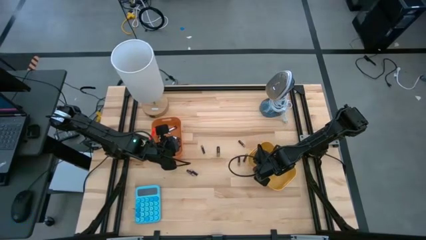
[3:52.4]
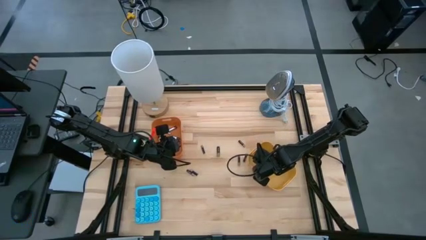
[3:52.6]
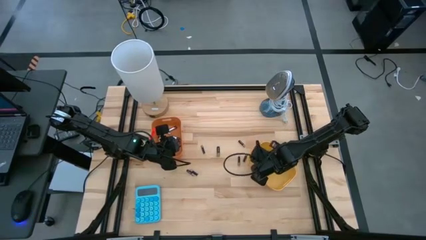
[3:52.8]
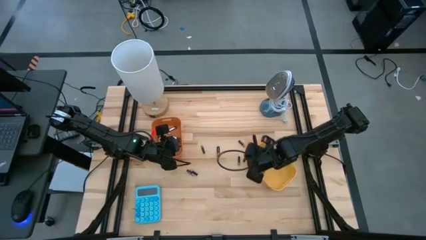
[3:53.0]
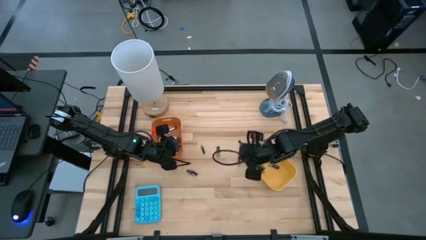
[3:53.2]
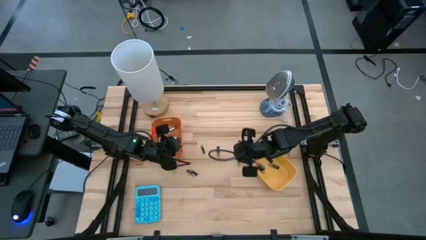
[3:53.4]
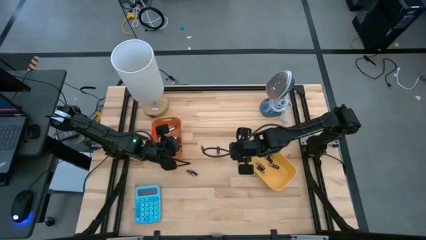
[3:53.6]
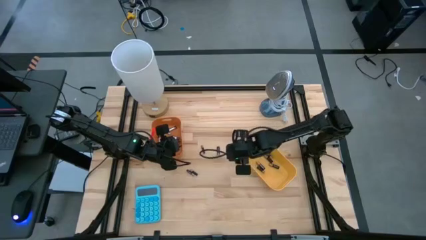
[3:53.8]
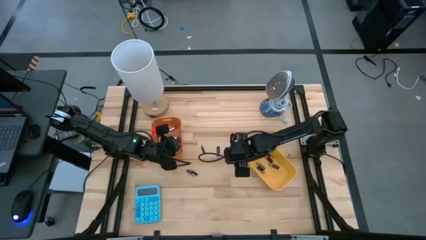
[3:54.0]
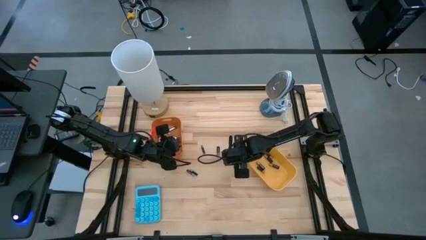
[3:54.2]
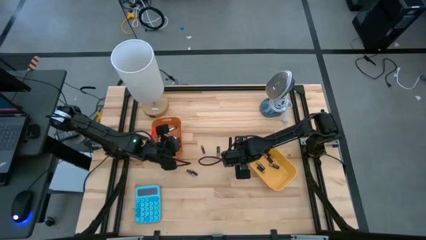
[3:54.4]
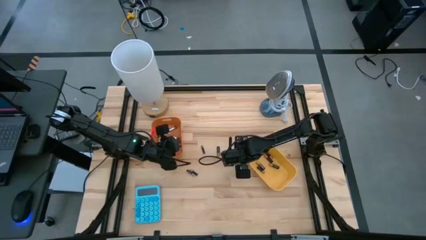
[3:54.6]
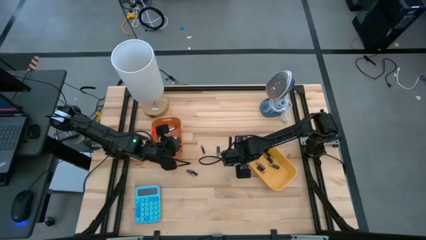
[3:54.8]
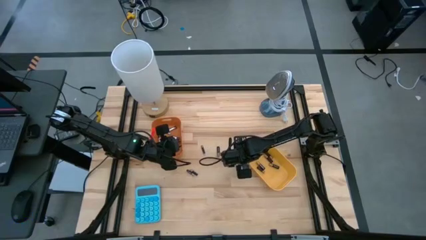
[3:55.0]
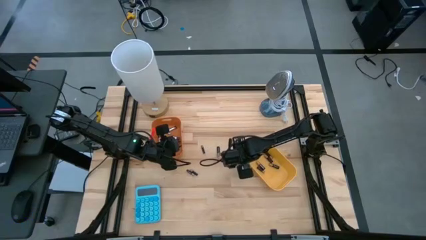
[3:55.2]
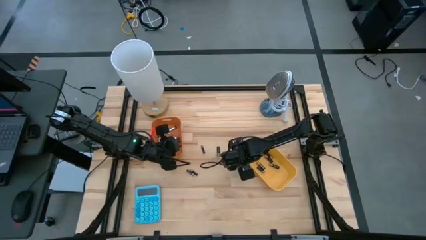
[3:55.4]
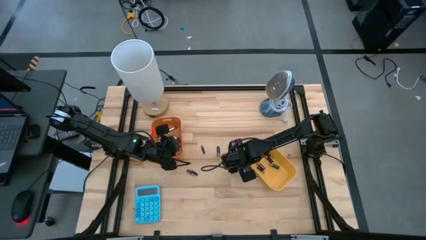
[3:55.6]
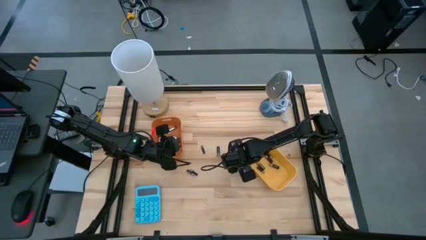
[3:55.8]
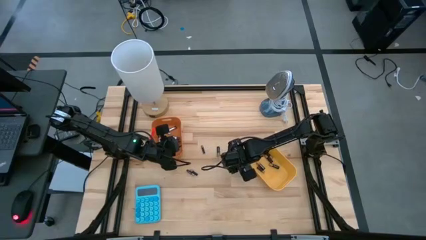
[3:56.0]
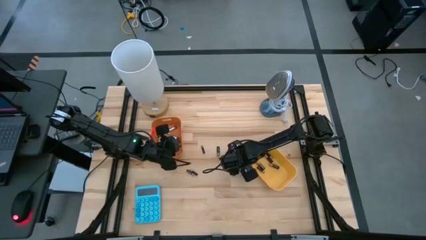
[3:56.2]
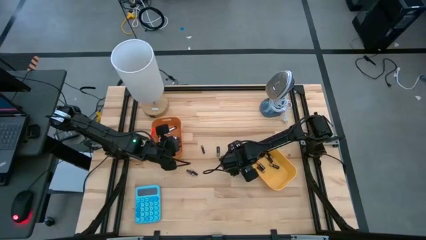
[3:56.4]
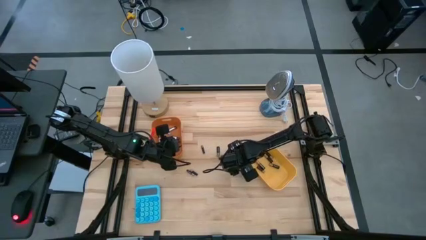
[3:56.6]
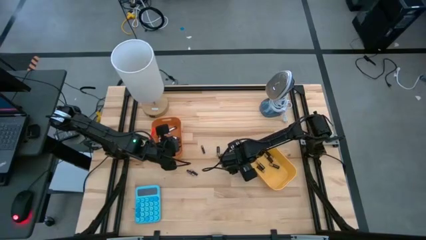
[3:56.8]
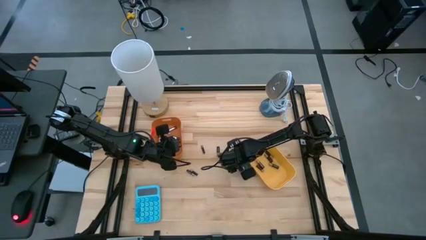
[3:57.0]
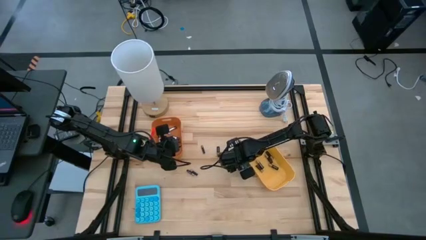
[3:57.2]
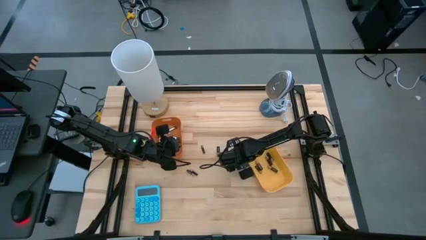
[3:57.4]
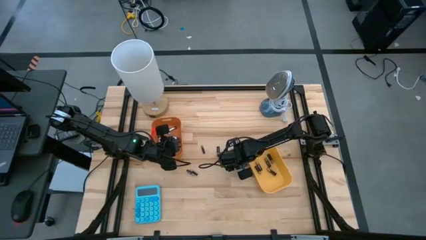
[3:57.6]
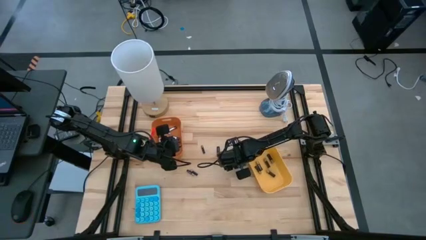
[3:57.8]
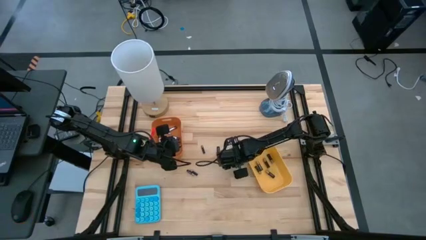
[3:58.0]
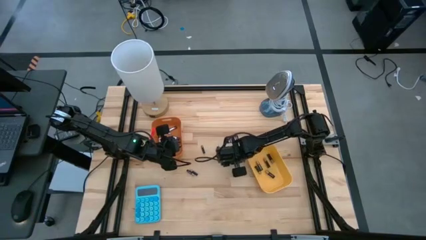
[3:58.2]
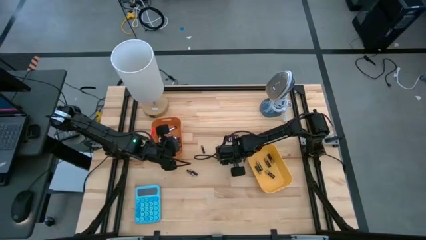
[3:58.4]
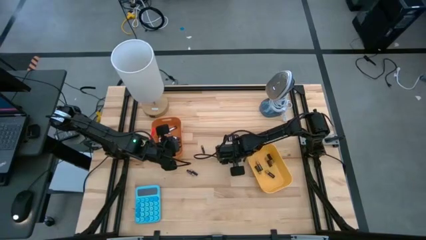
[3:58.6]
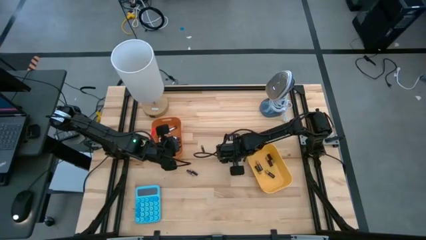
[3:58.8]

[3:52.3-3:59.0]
Task: Sort batteries
Put the gold battery into the yellow bin

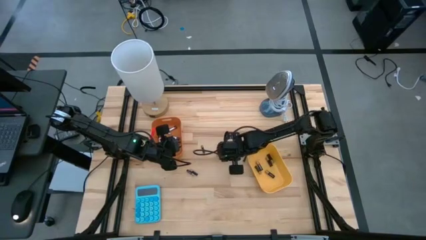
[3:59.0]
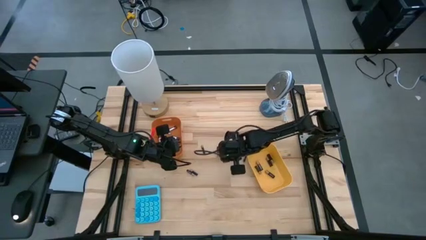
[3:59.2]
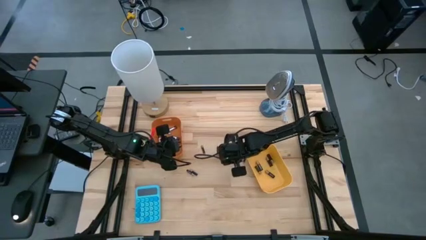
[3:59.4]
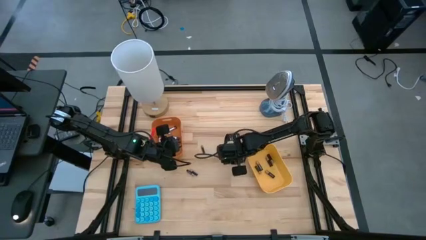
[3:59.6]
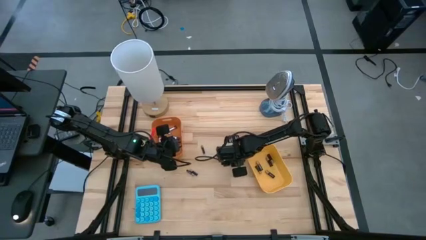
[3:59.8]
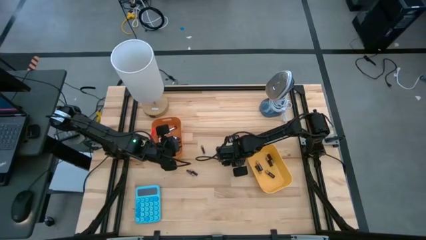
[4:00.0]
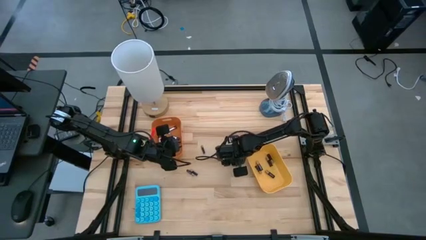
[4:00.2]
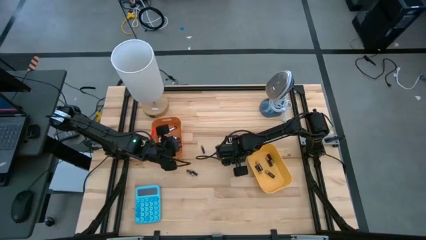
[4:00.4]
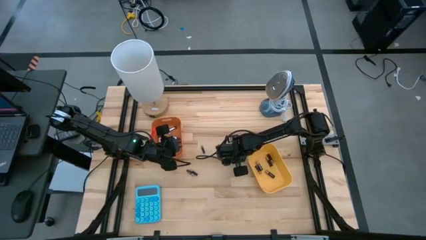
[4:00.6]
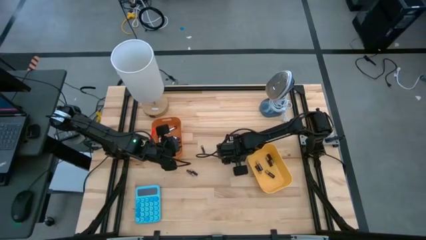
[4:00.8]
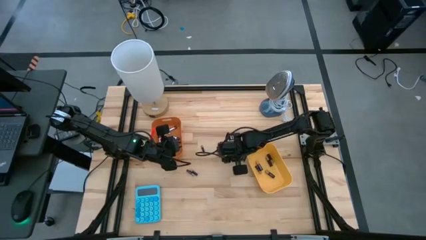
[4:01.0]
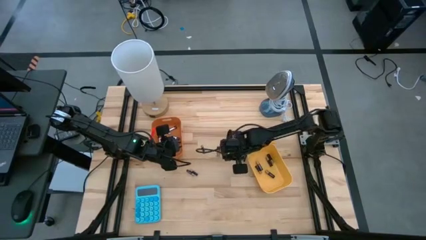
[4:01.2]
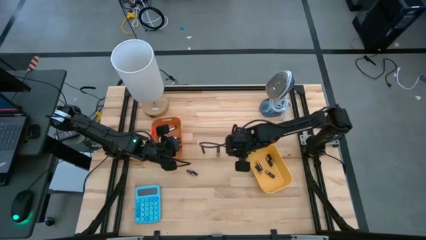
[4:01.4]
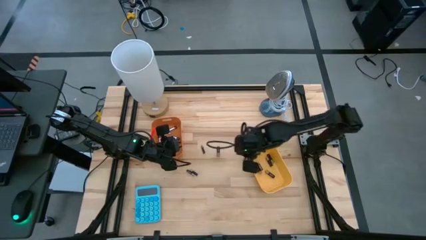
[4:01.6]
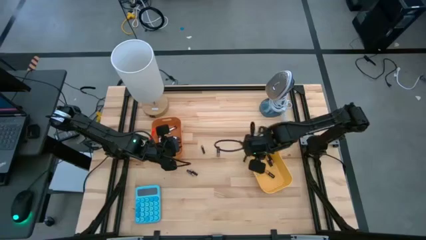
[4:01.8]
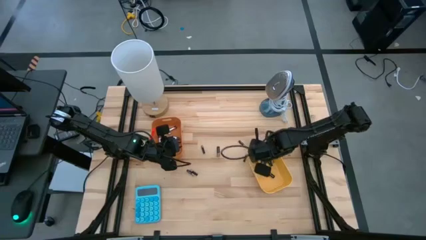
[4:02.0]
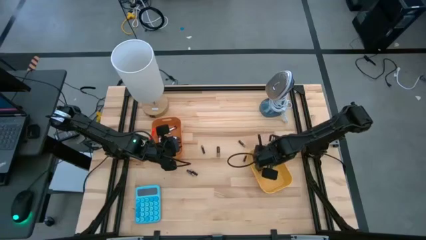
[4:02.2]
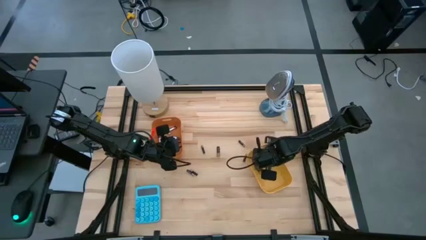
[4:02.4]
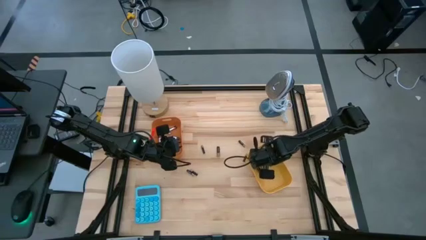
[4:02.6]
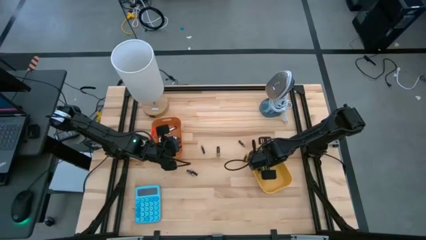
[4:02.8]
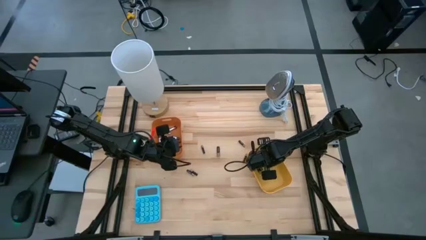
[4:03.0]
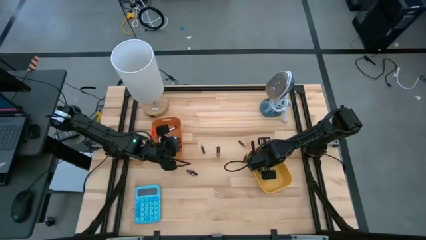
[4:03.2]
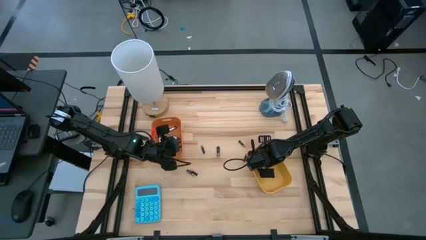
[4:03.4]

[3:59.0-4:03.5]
Put the gold battery into the yellow bin

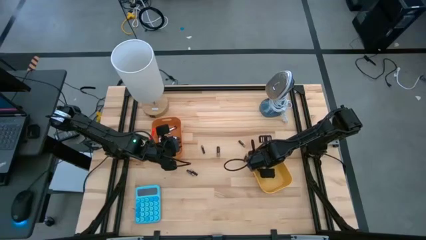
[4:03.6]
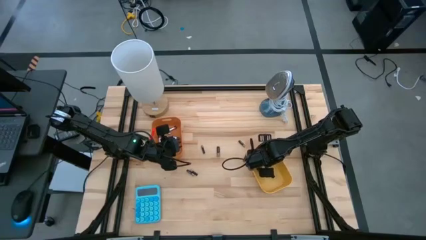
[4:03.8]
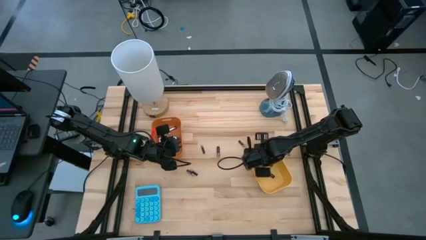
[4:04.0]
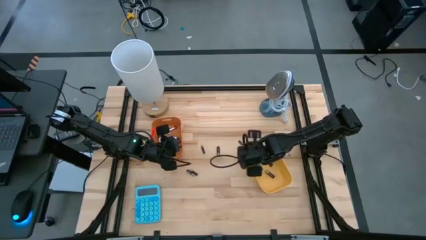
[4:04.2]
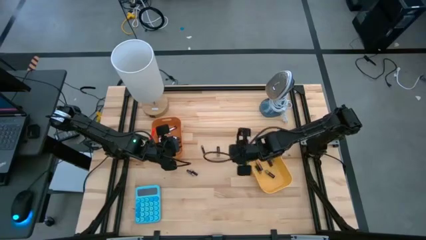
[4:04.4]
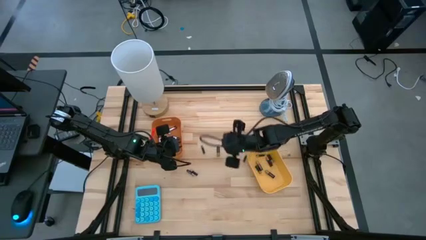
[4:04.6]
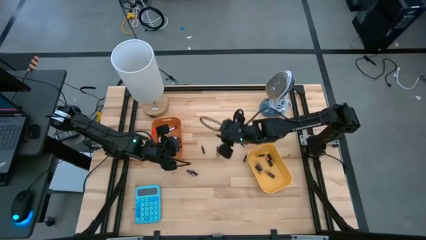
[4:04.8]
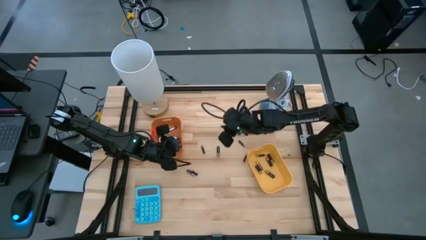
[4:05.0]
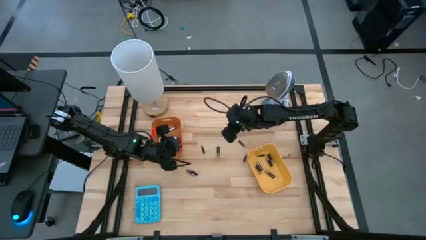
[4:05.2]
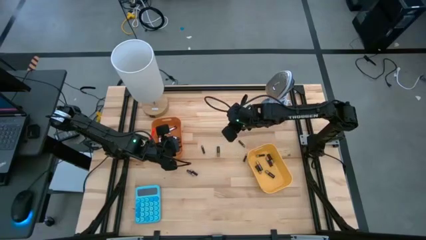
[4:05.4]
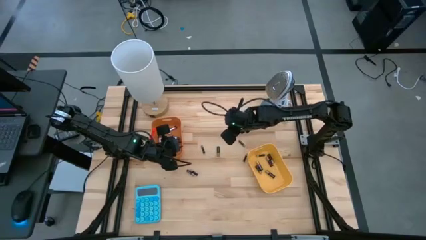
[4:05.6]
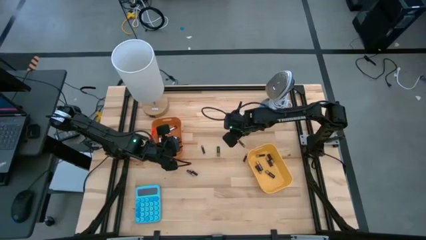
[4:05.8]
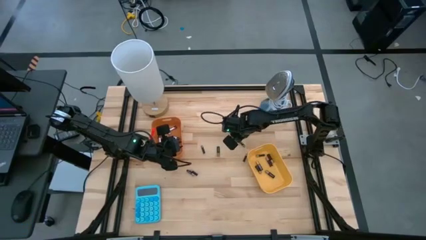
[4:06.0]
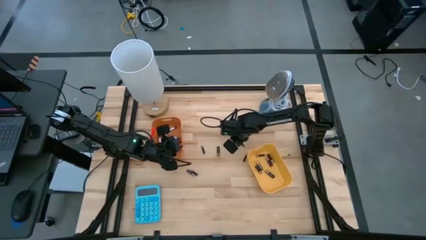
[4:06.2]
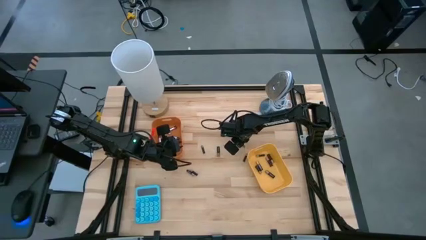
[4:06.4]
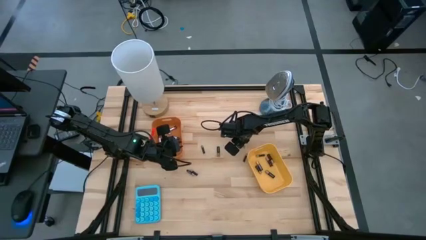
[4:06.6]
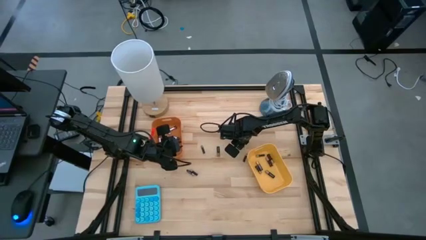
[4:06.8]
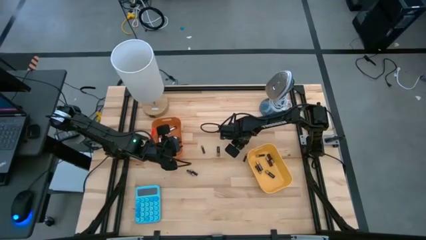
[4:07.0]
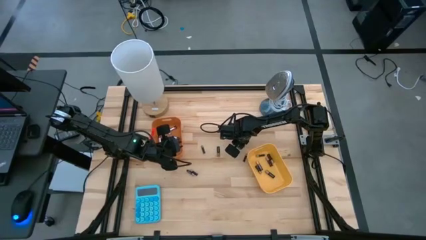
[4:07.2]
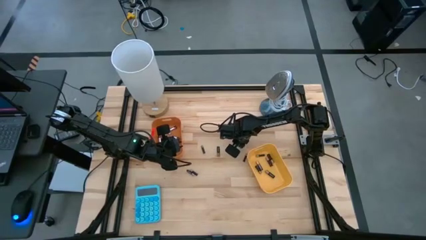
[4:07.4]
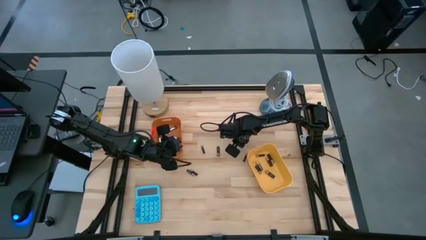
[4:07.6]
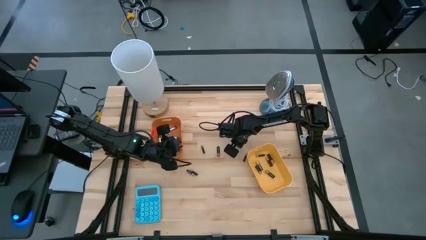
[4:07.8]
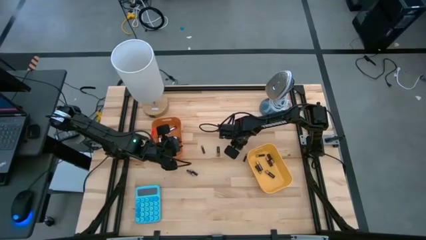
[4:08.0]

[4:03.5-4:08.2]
Put the gold battery into the yellow bin

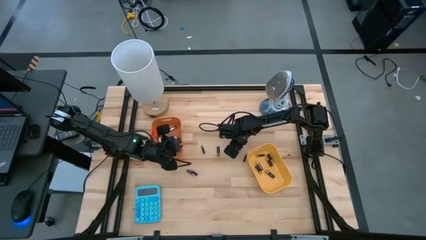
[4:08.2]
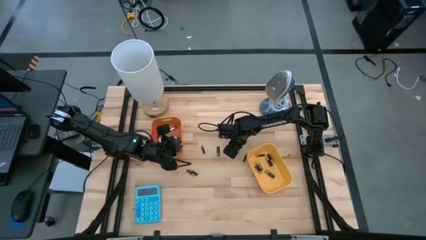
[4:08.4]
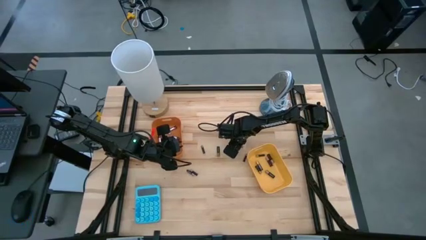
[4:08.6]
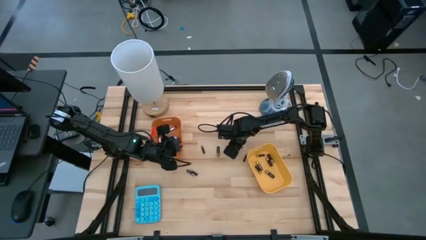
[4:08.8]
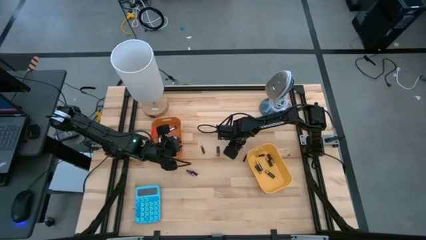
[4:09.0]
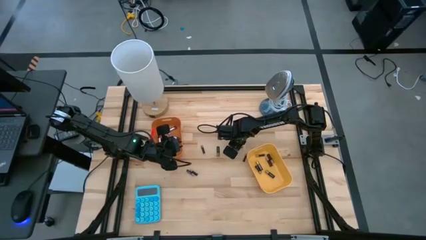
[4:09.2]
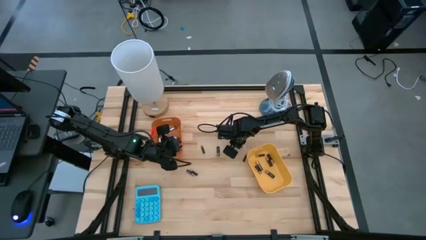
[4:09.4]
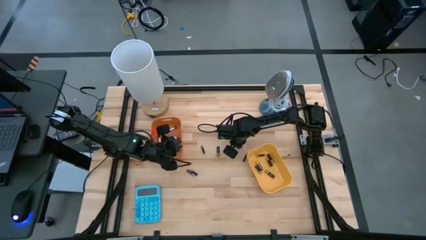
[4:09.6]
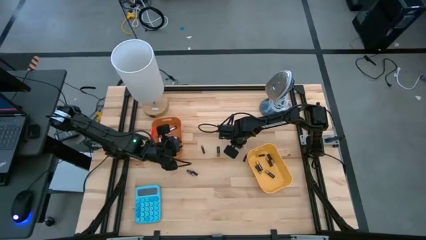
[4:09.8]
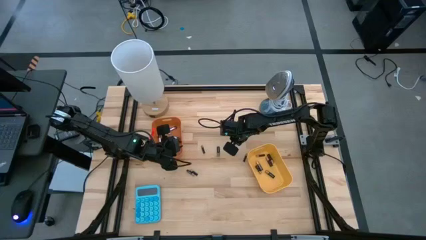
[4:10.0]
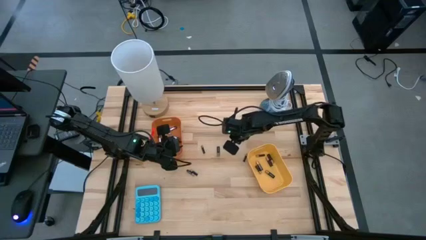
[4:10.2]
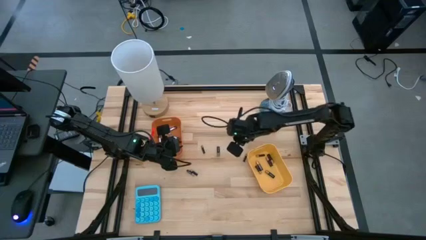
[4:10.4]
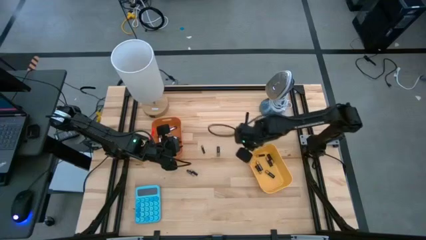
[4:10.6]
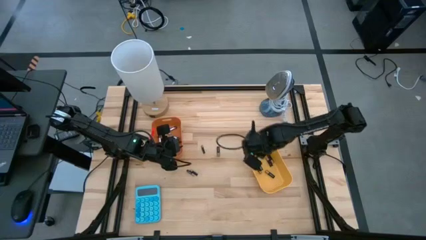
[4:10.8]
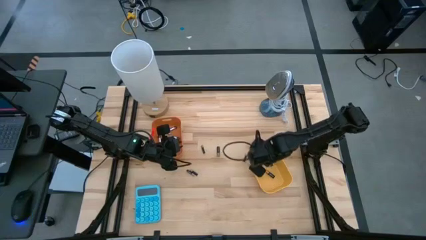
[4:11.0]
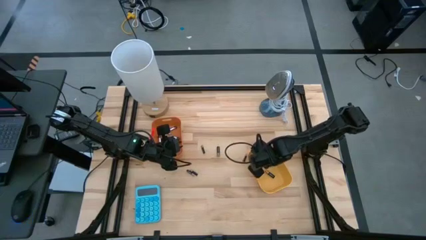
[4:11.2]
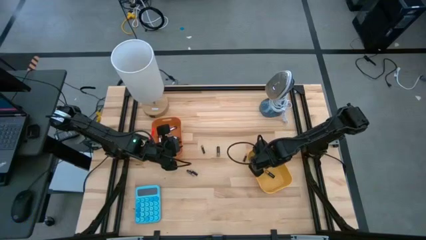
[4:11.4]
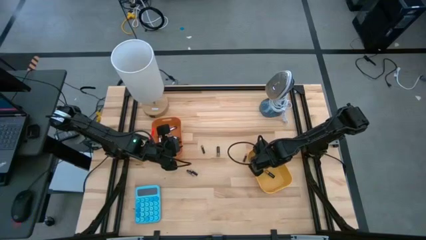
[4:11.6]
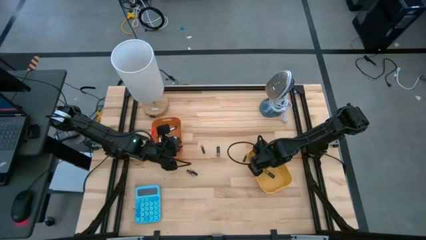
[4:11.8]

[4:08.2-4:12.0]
Put the gold battery into the yellow bin
